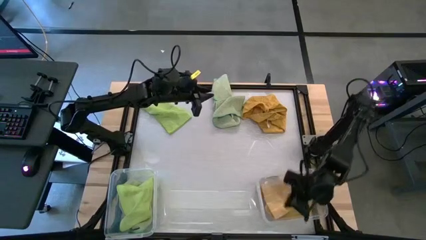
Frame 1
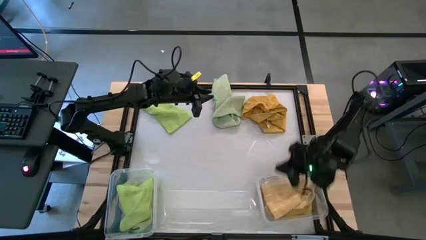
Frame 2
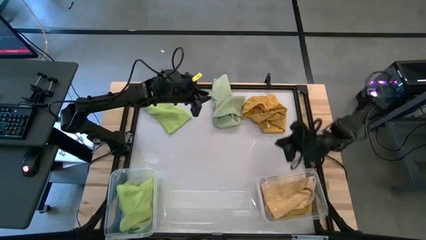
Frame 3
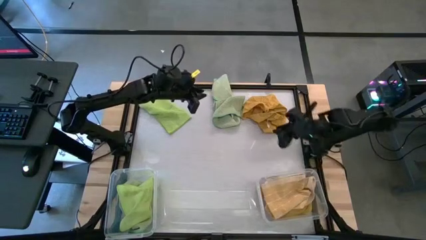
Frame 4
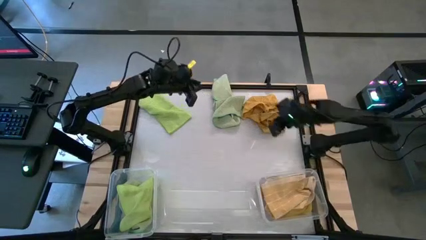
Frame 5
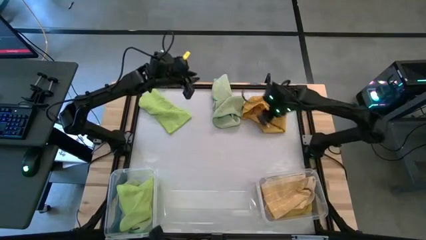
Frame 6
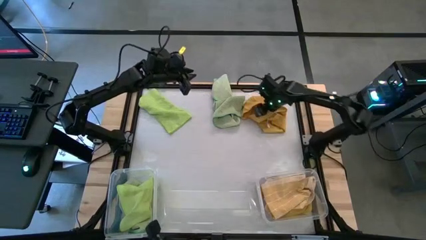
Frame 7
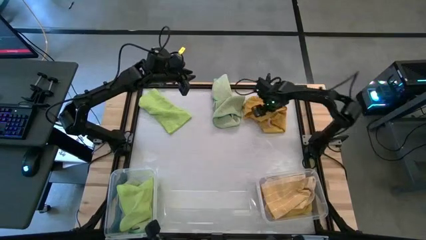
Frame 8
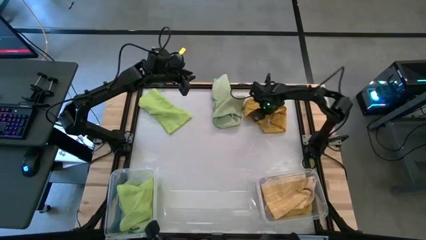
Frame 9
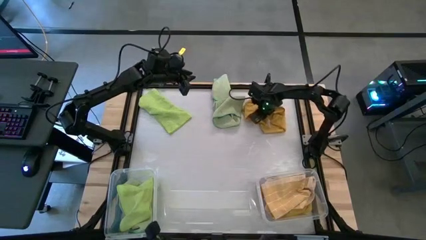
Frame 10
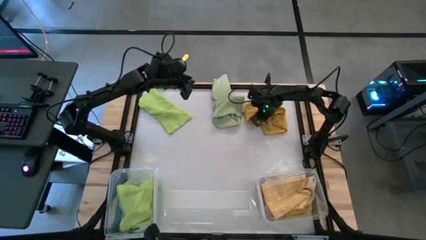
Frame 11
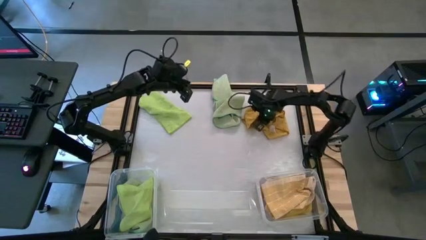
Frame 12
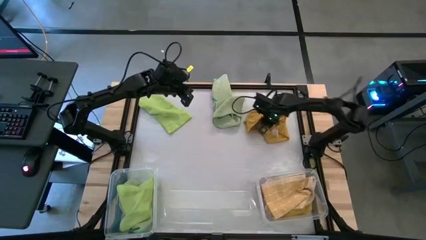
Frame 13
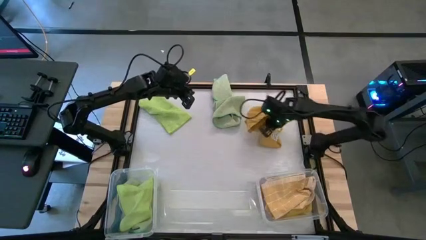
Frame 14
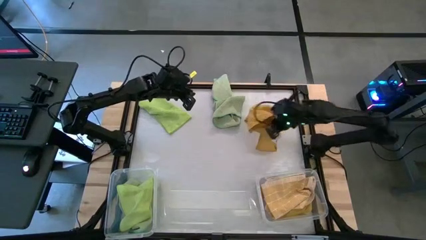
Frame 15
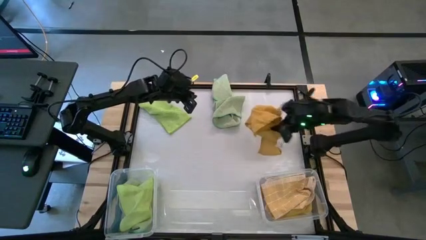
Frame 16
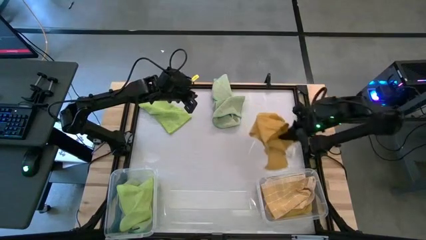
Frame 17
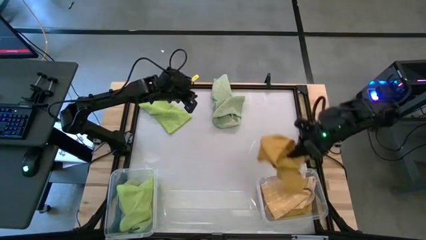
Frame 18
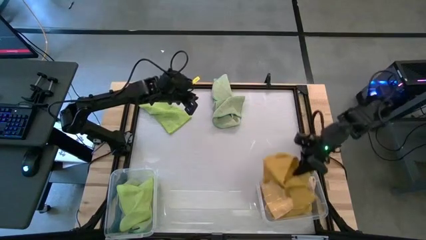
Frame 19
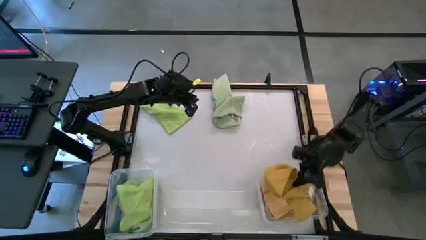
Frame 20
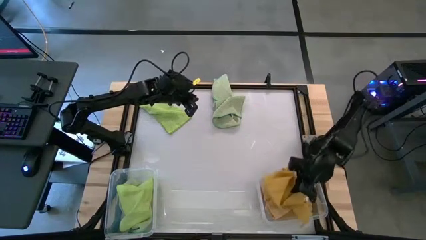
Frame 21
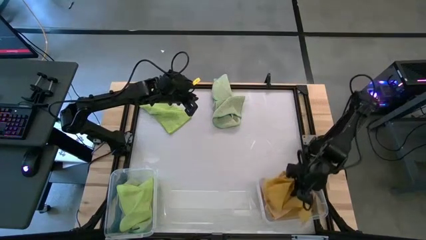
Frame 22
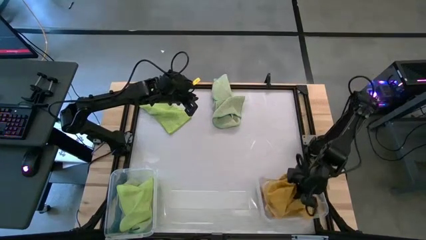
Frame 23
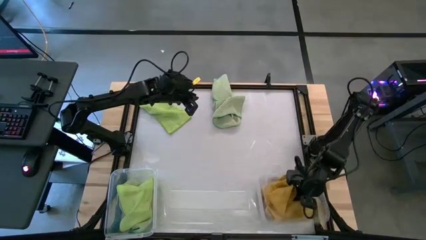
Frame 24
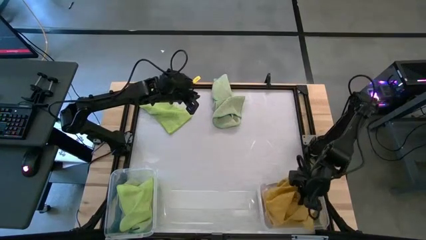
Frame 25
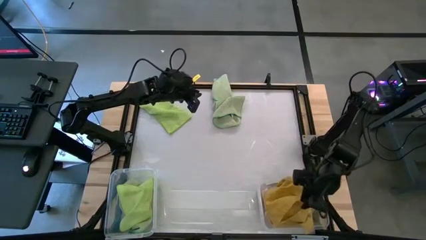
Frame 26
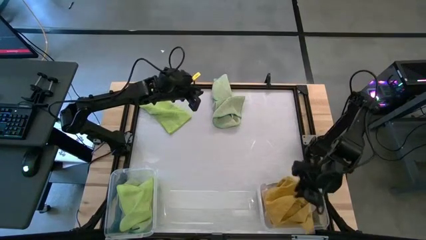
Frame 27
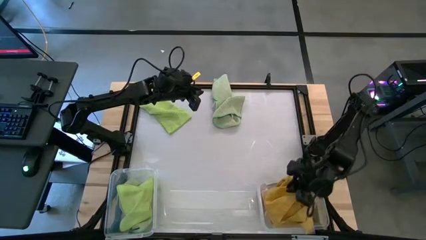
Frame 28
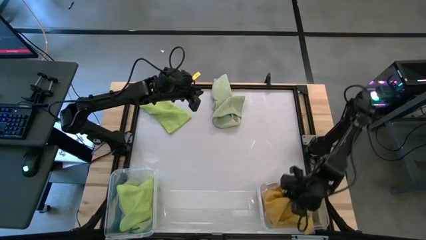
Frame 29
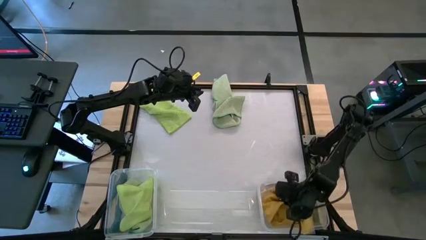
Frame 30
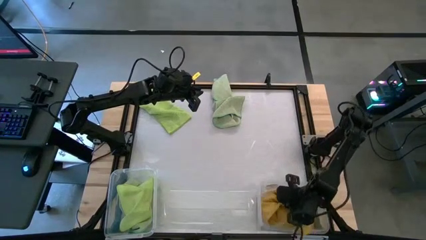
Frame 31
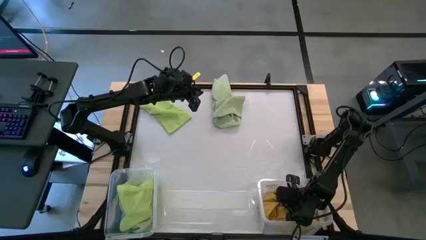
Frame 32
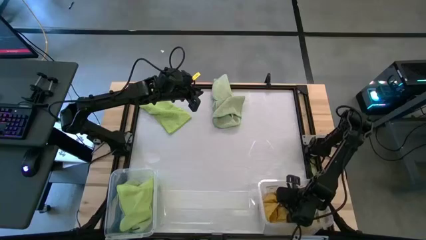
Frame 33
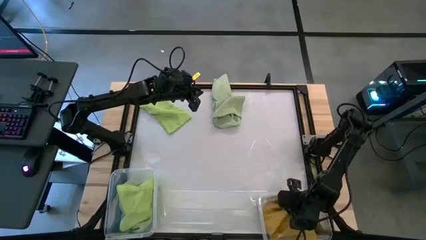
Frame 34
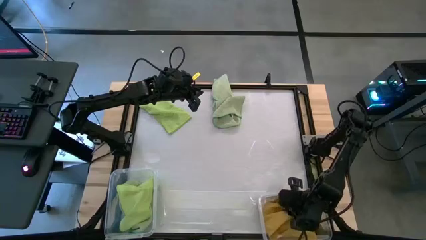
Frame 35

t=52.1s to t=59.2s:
Task: Sort microfiber towel by color & place in baskets
Put the yellow microfiber towel into the bottom transparent bin

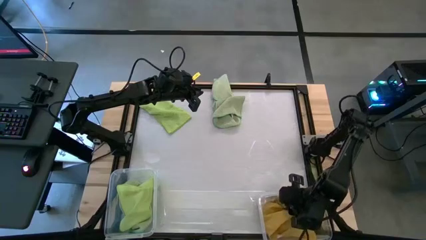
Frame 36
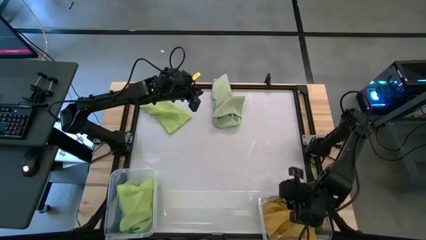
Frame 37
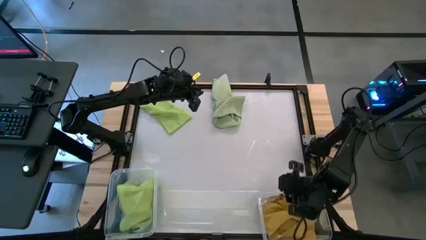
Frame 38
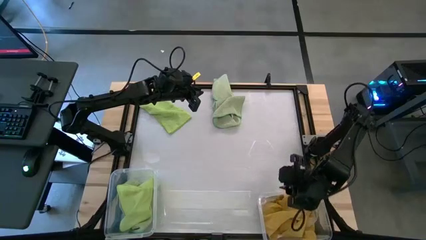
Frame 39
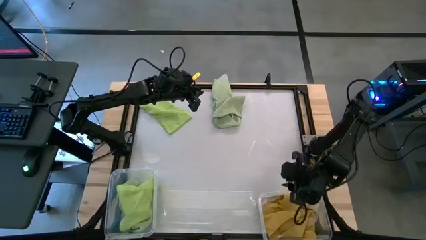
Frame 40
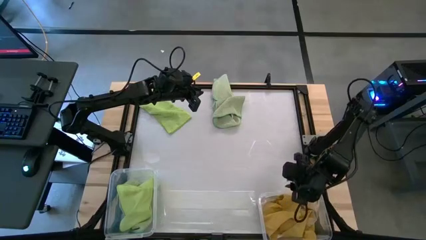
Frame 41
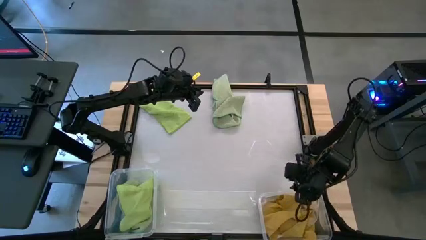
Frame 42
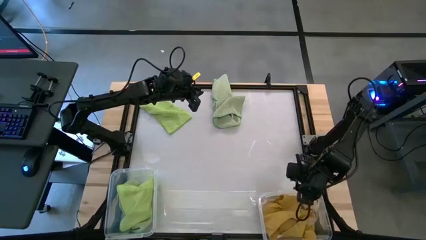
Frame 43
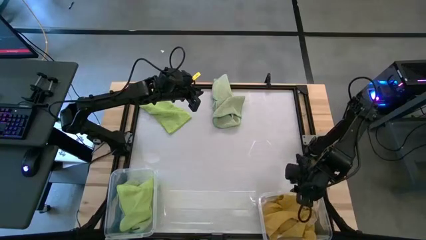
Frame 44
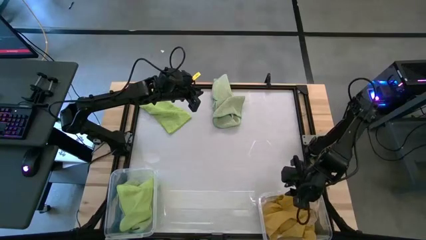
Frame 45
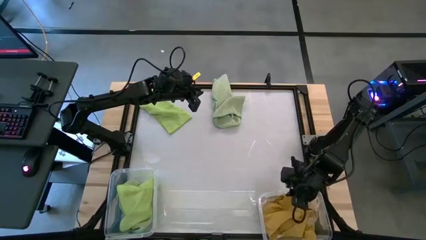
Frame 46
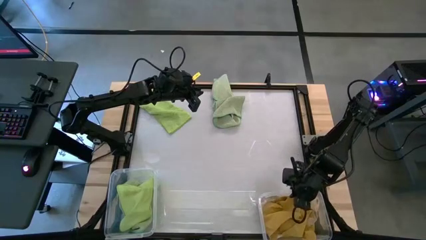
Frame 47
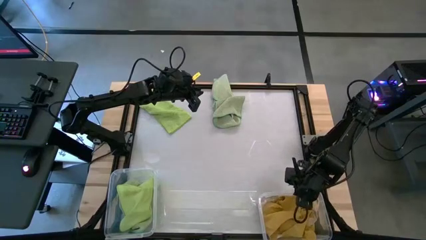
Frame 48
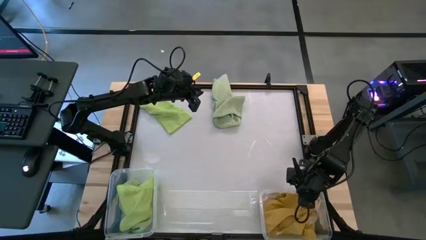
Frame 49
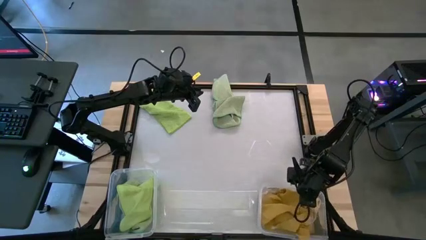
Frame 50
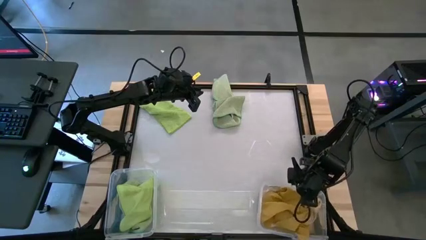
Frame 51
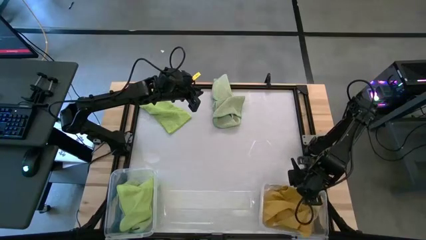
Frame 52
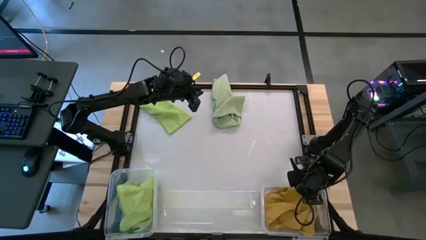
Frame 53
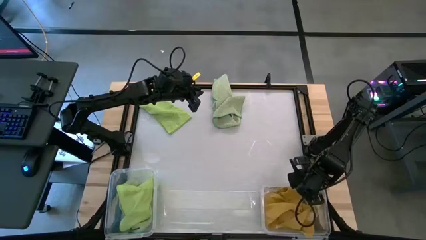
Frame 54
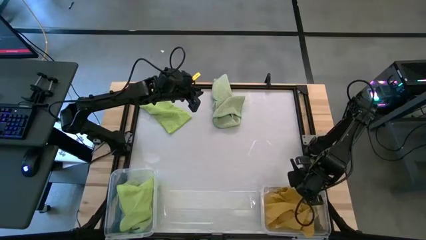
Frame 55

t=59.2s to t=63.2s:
Adjust the right transparent bin to the right side of the table

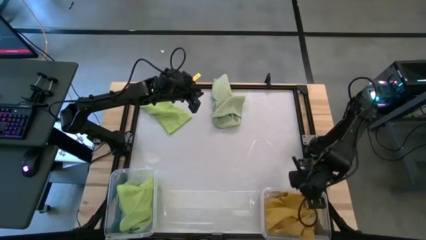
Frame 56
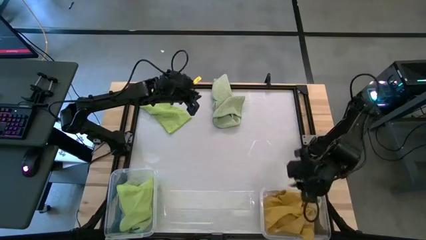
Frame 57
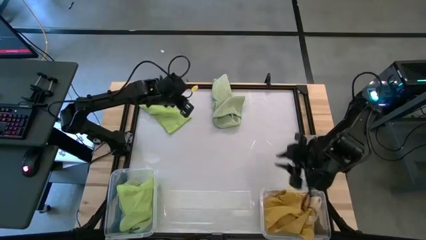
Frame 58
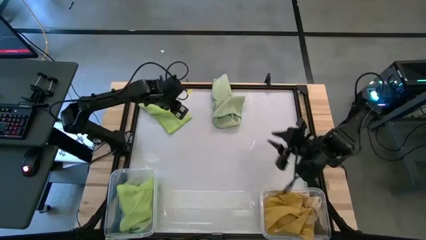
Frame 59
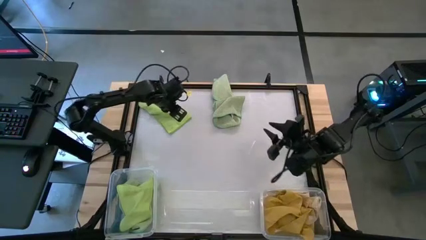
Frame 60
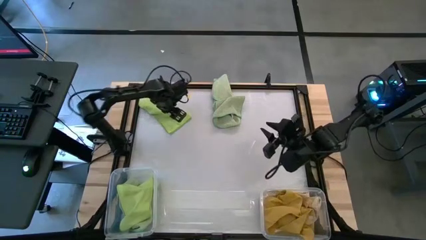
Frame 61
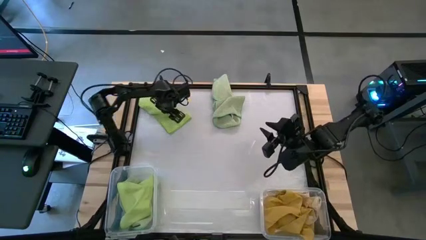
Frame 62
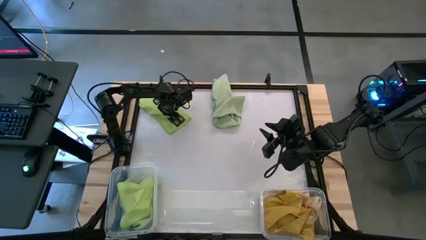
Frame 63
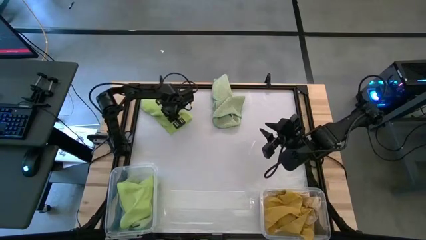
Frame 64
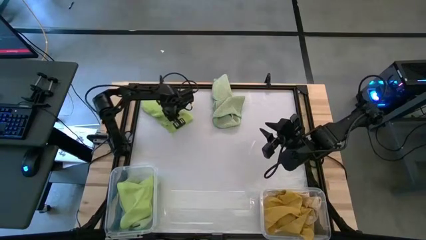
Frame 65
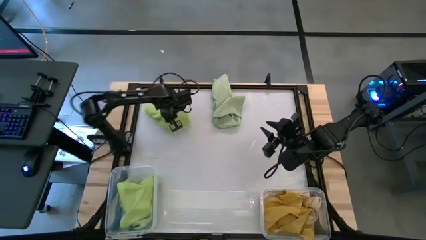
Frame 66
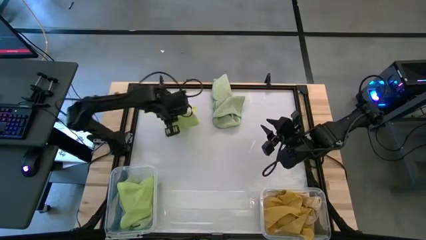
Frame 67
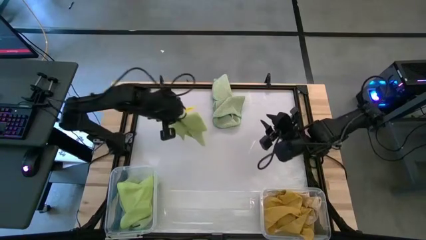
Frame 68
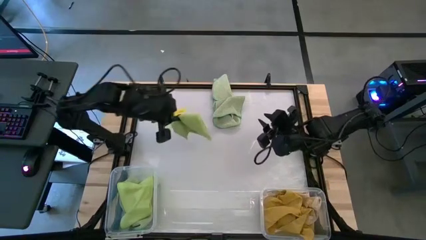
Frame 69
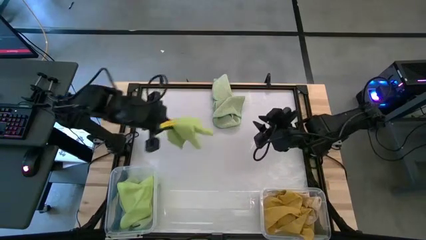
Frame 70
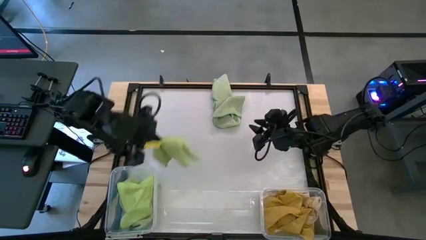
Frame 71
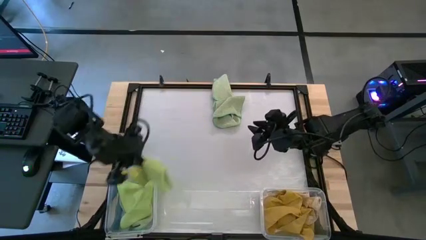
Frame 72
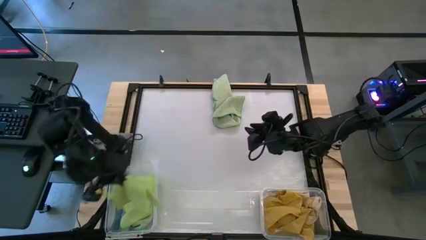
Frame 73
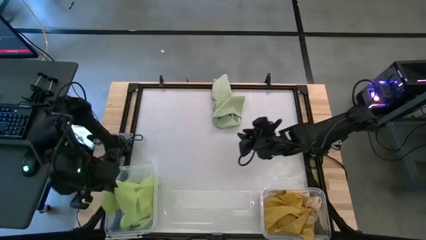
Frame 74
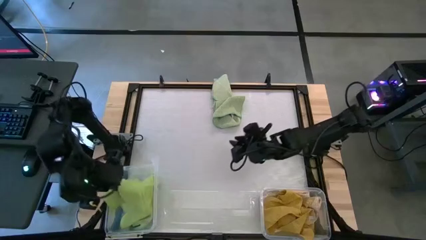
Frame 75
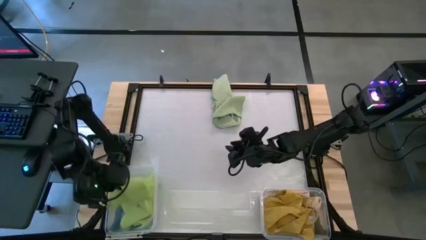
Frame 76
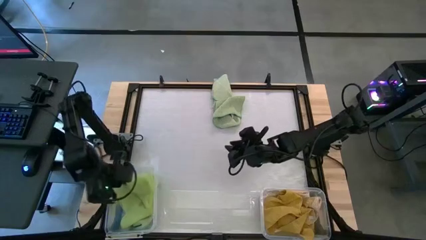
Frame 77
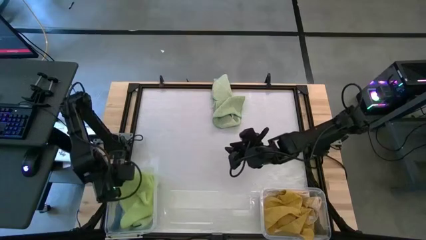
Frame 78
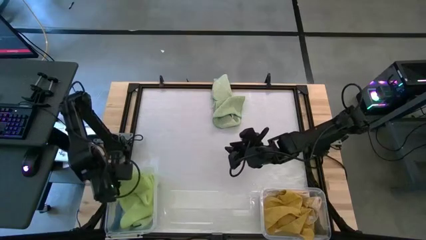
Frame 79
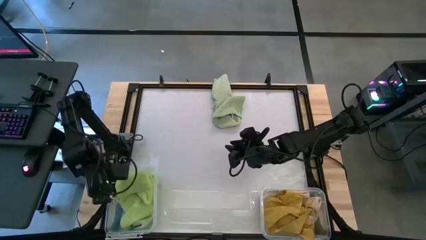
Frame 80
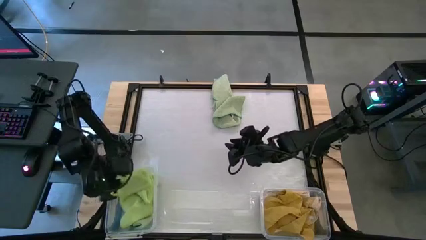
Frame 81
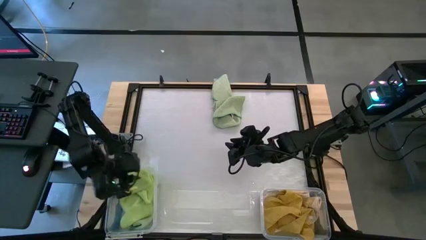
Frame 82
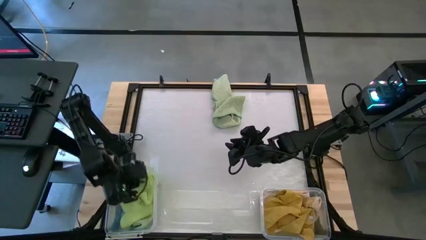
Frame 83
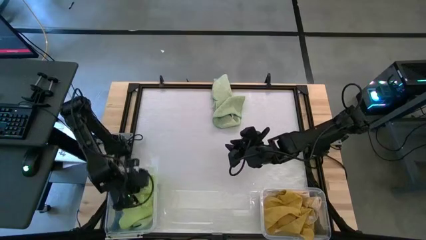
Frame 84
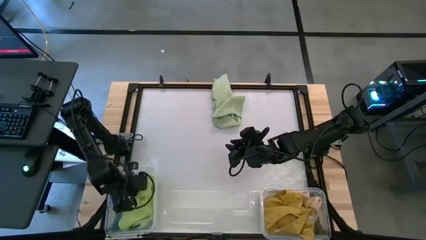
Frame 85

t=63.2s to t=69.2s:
Put the light green microfiber towel into the left transparent bin
